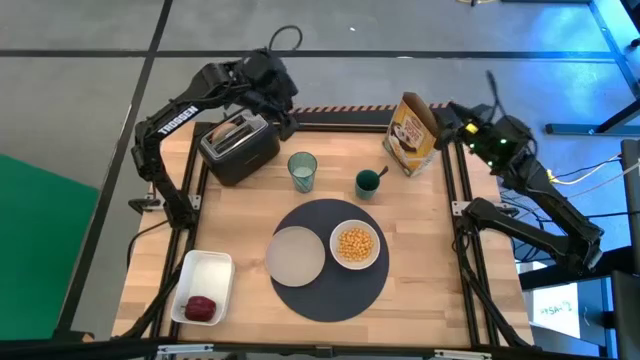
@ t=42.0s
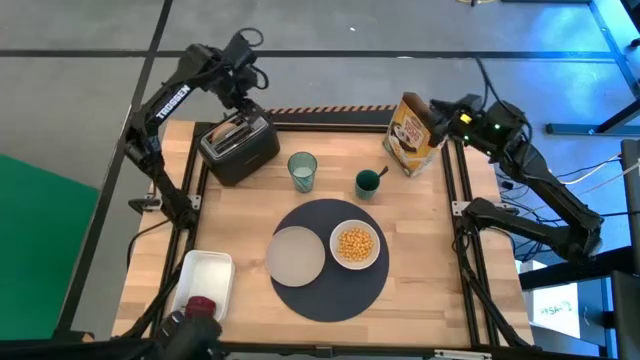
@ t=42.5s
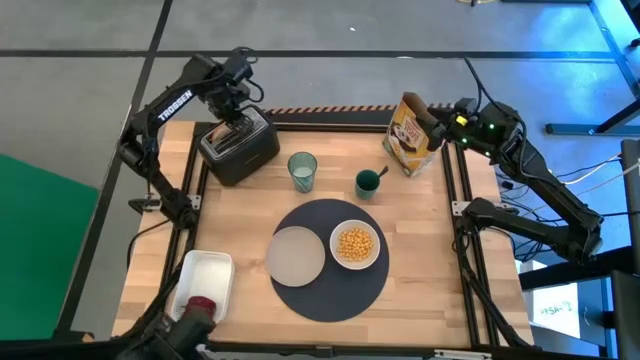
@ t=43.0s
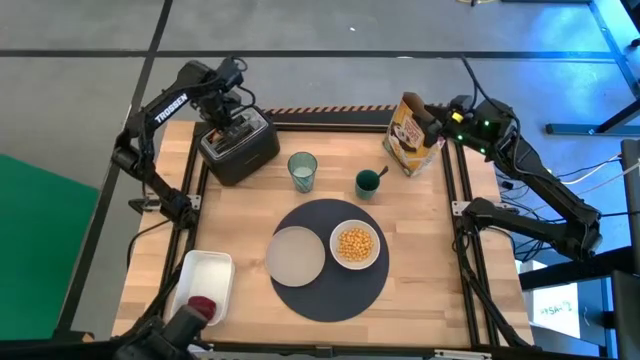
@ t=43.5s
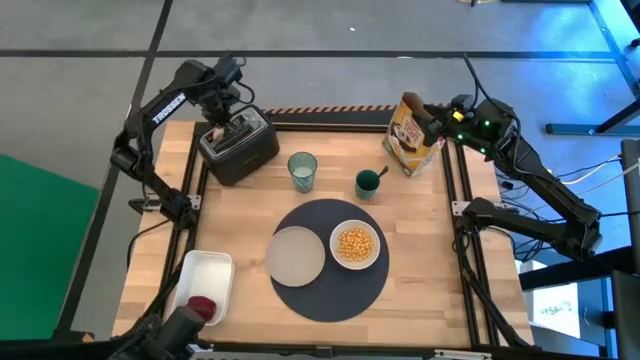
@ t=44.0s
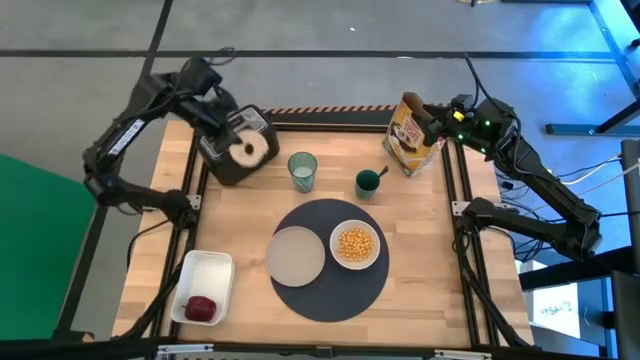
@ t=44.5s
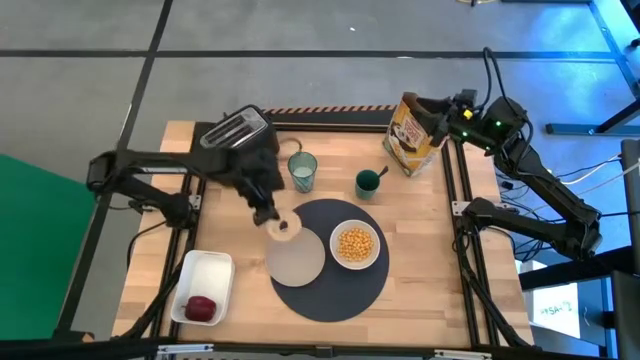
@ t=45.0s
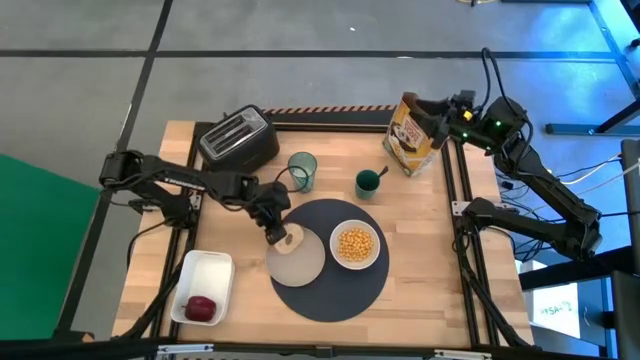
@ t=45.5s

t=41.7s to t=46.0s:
Task: Arrange a breakfast setting
Put the sliced bagel from the toaster on the gray plate

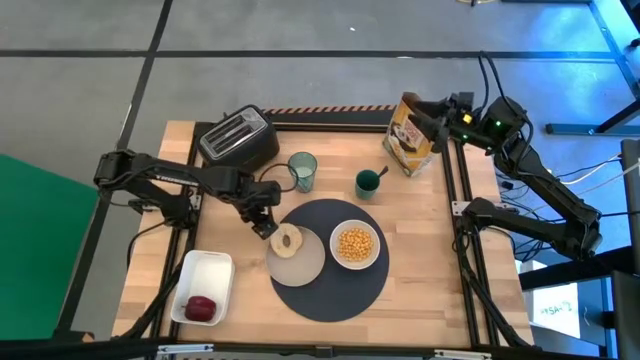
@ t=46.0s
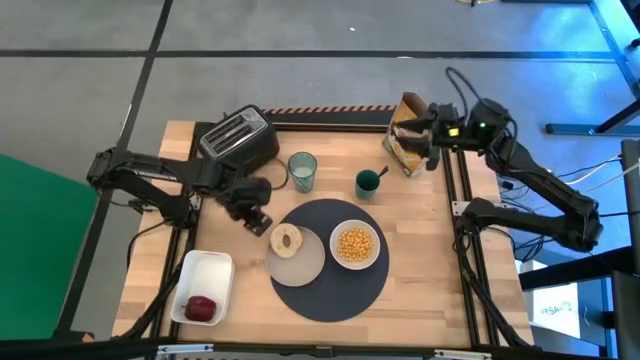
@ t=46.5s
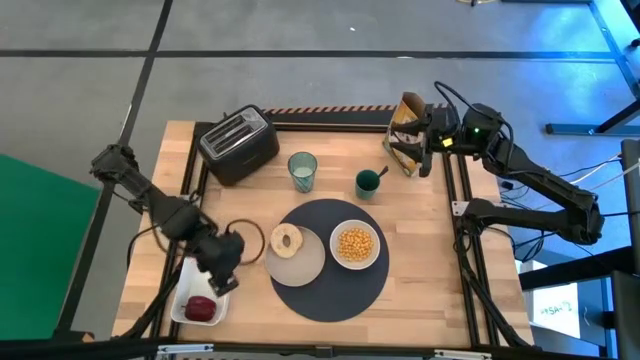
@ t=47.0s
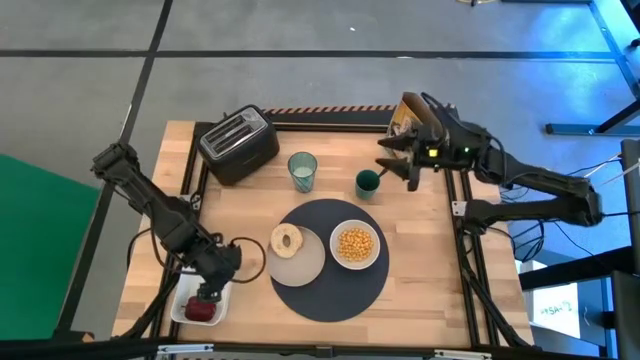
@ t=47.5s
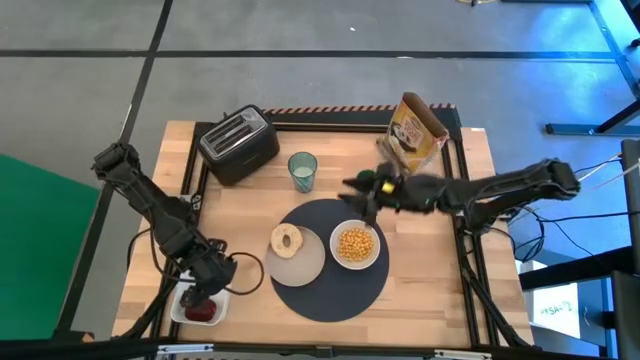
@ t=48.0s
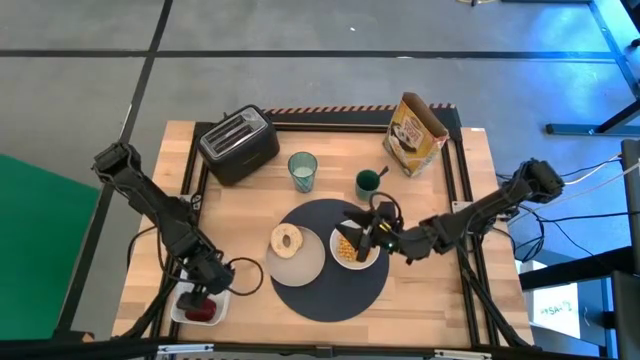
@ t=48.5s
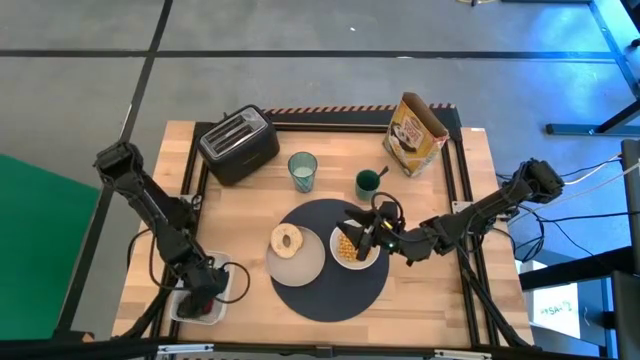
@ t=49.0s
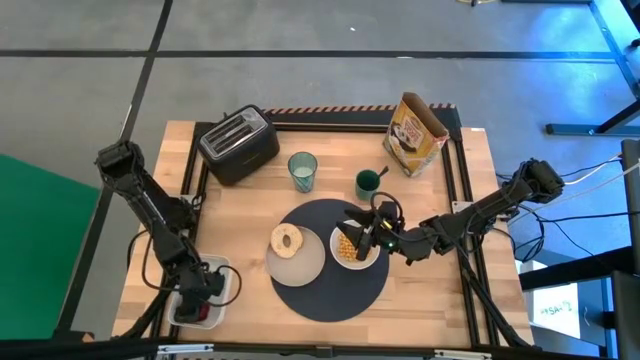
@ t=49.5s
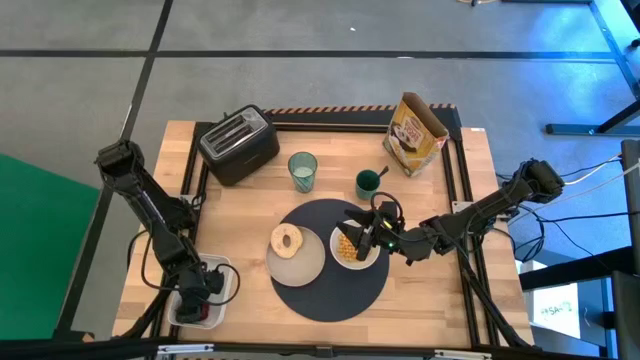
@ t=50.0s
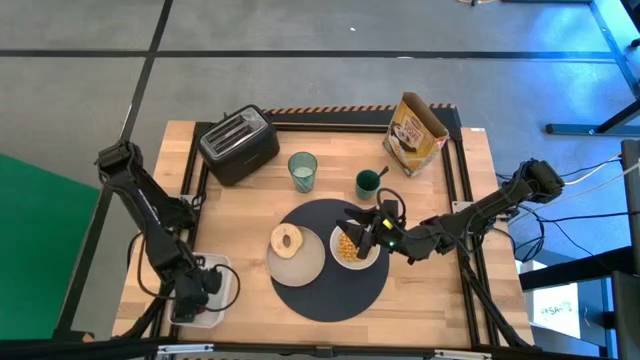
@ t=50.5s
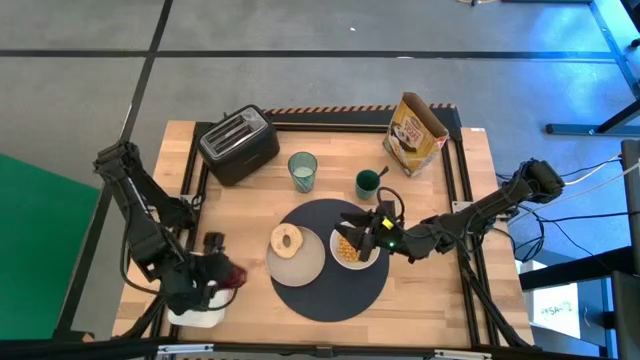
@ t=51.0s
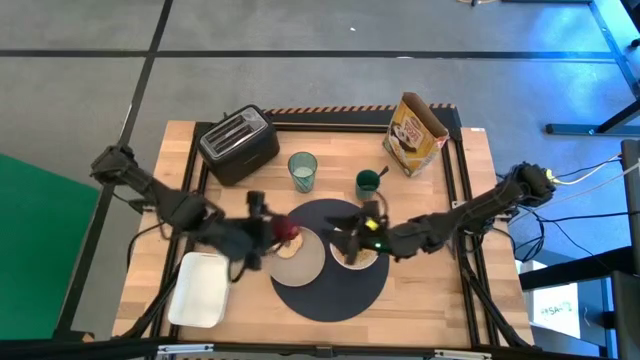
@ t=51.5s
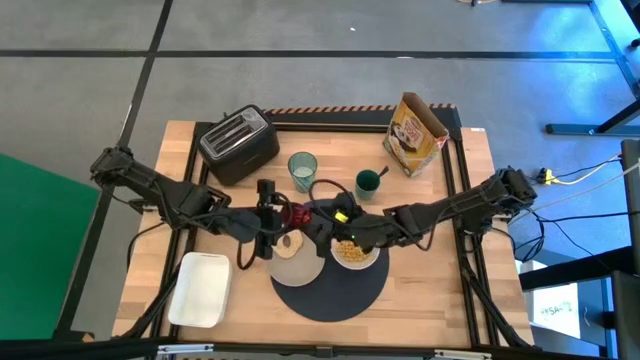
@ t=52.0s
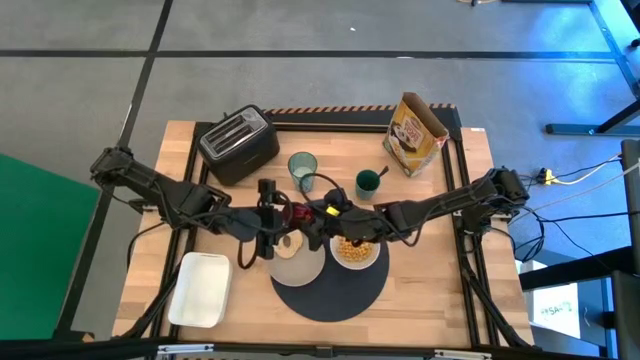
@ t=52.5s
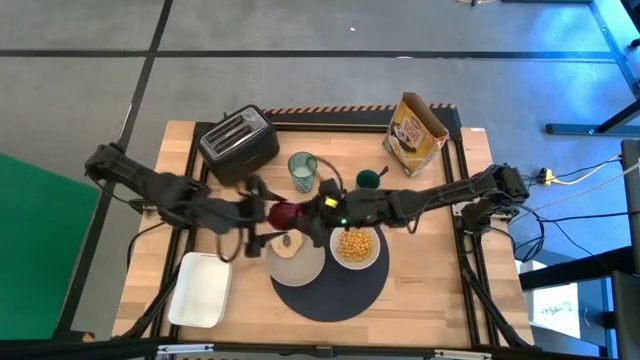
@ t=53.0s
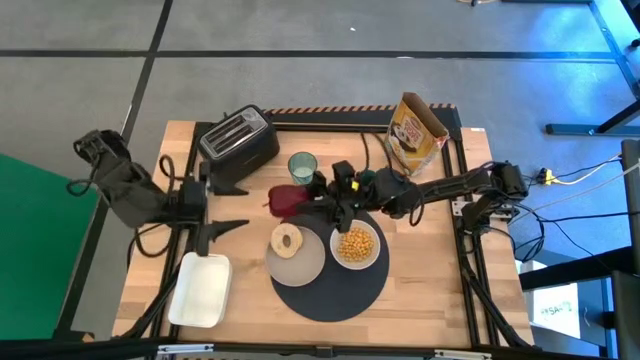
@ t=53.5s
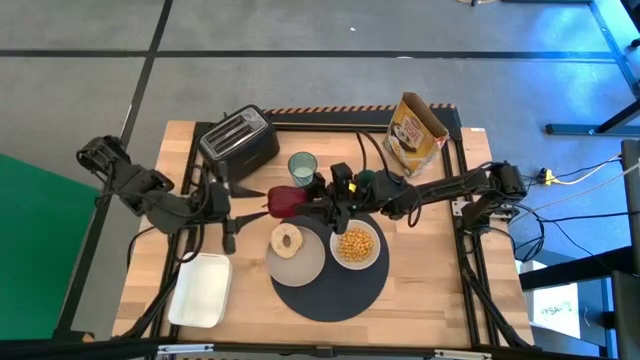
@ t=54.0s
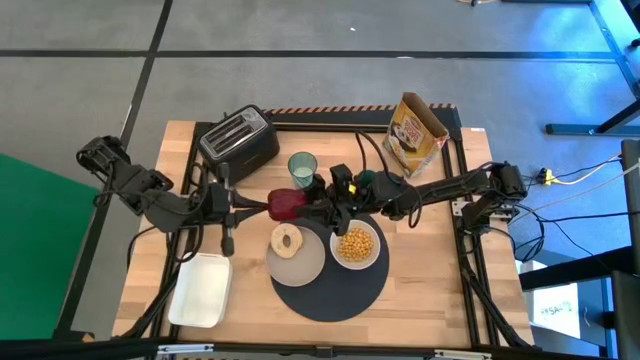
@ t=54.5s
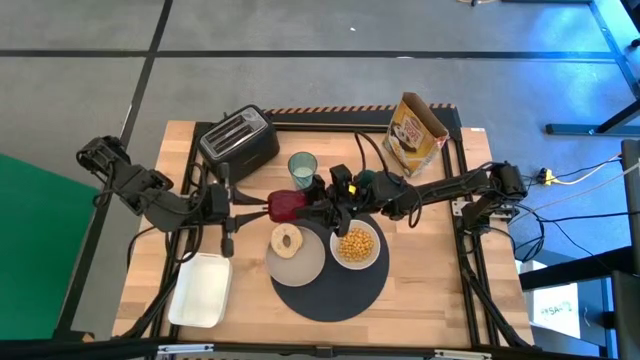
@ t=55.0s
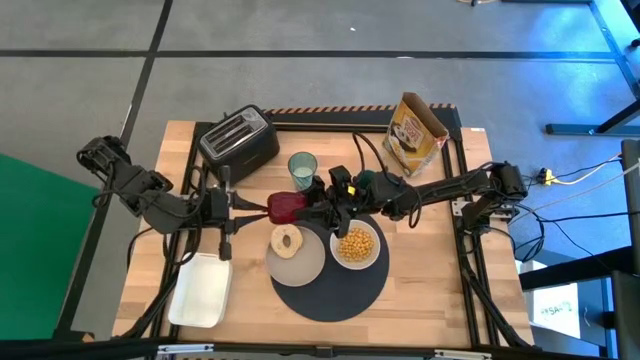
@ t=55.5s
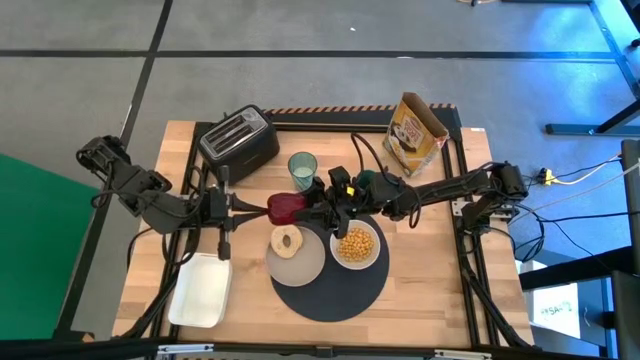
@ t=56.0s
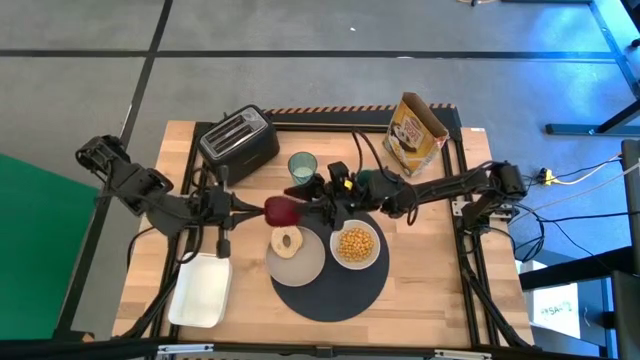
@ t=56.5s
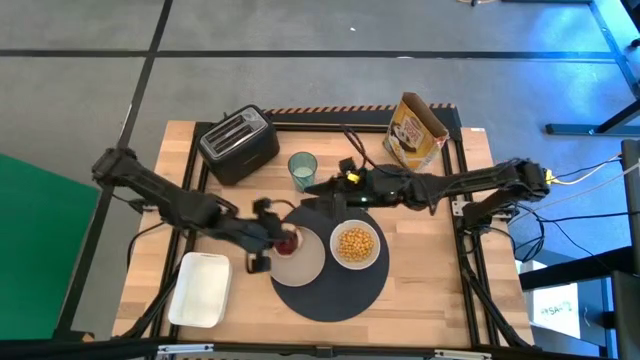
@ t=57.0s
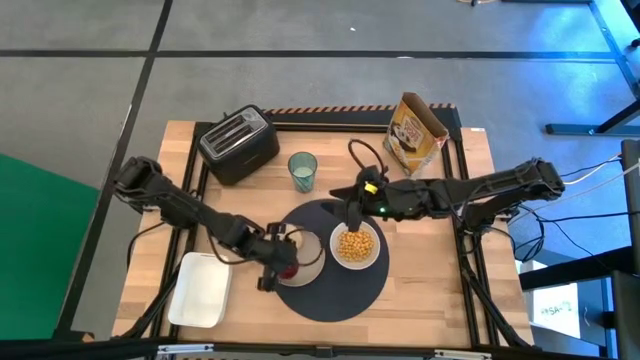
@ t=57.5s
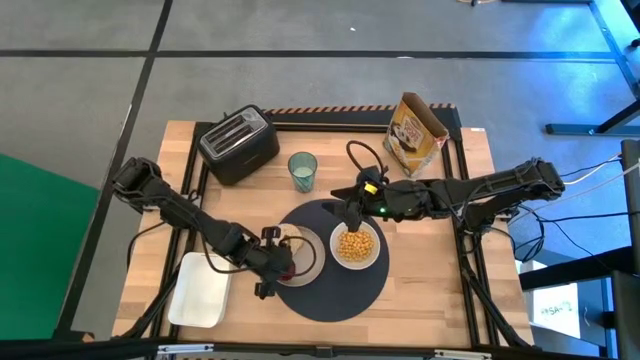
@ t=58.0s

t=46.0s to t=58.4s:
Put the red apple from the white bin on the white plate at the bottom of the sliced bagel

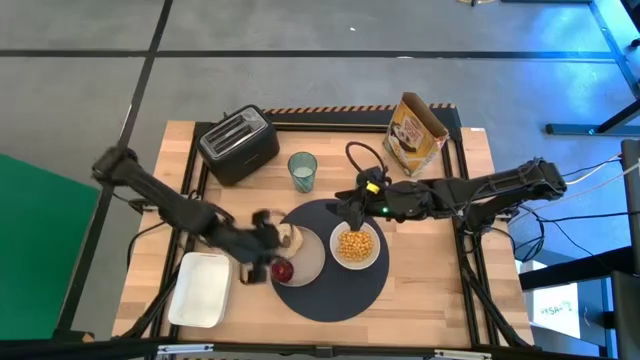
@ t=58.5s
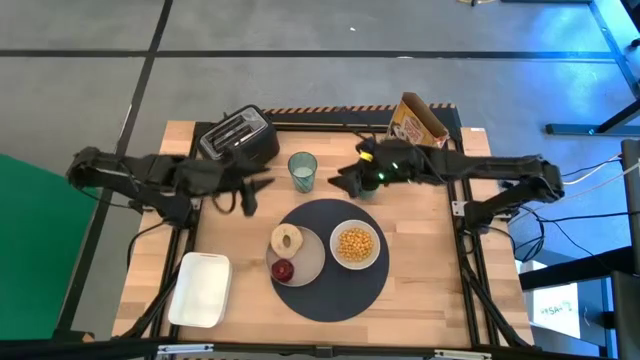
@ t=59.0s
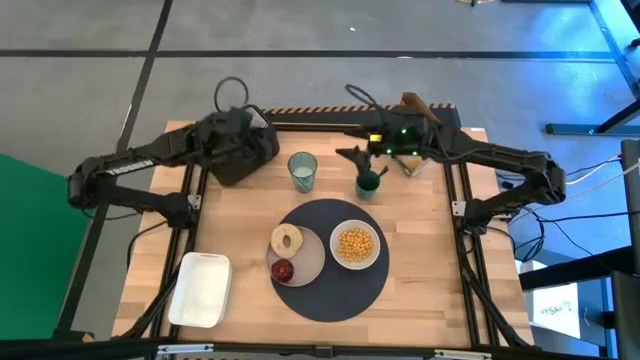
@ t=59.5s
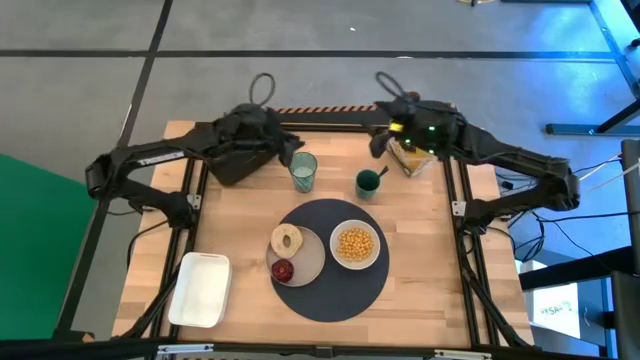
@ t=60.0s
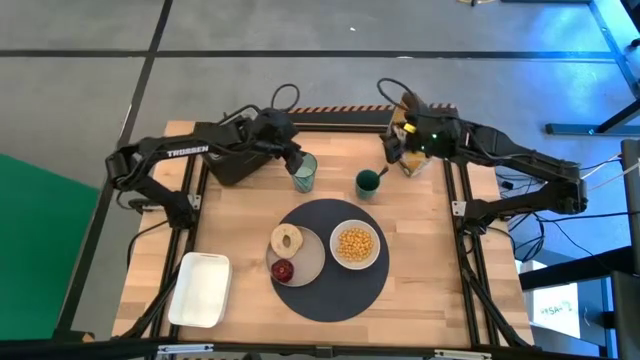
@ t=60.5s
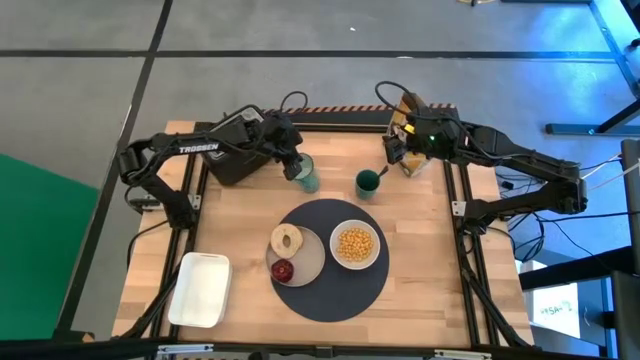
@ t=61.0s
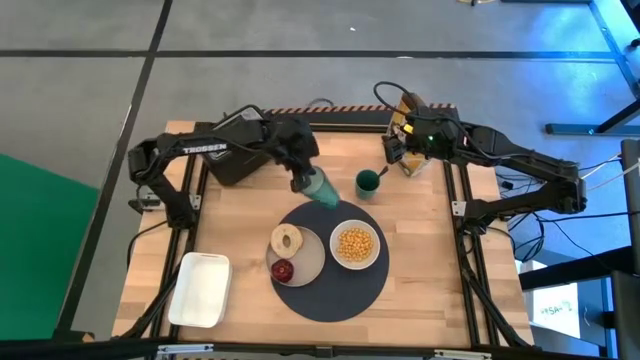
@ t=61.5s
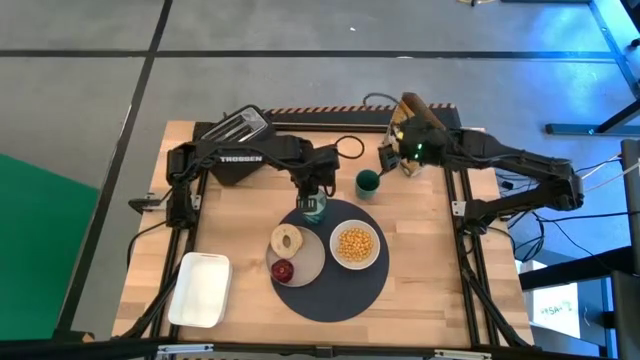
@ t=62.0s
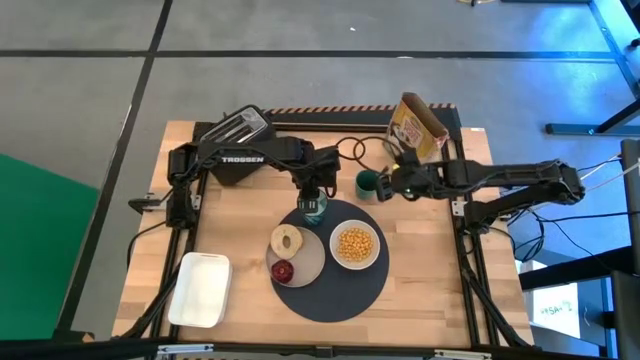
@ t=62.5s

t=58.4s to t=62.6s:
Put the blue glass cup on the dark blue table mat above the gray plate and white bowl

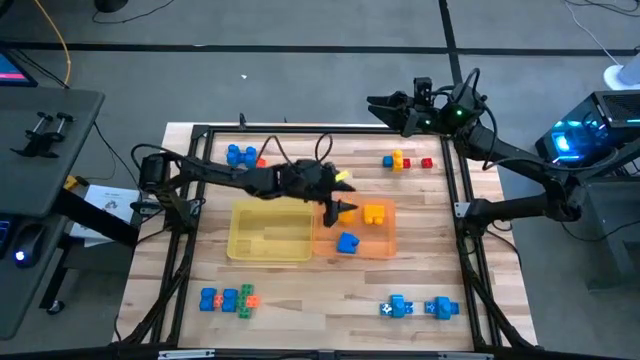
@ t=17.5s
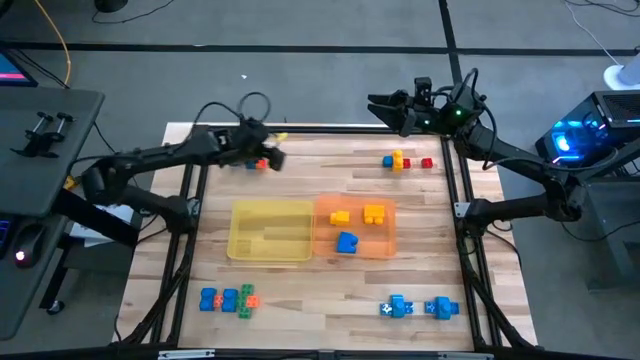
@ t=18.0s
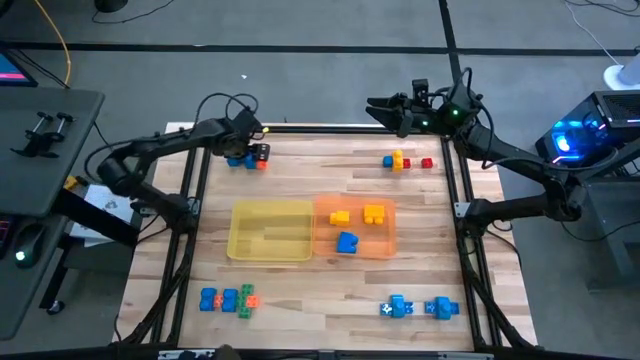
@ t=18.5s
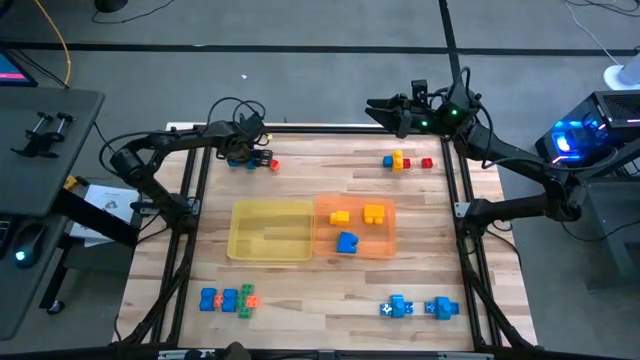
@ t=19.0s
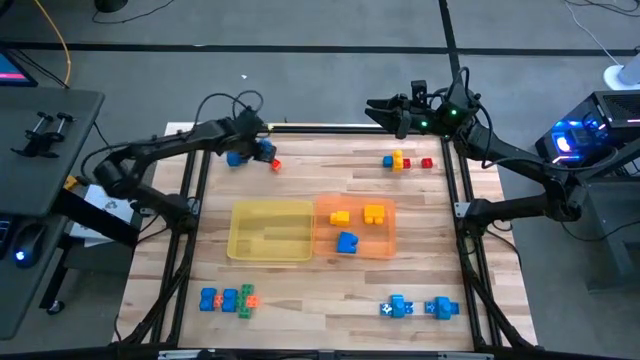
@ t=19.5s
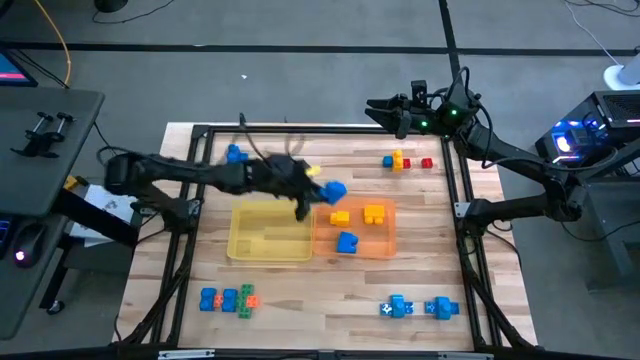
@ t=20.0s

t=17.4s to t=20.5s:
Task: Sort blocks by size
Put the large blue game piece into the orange bin
